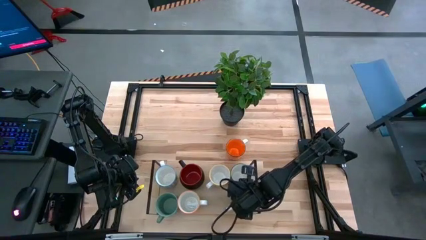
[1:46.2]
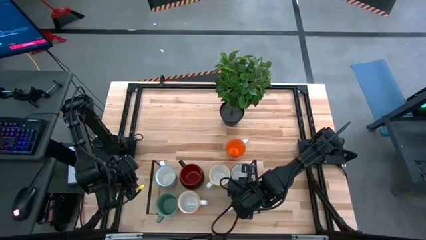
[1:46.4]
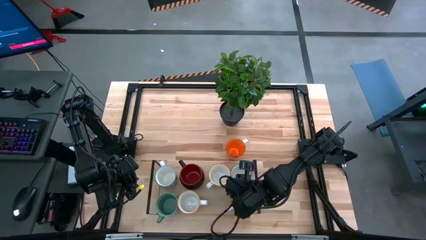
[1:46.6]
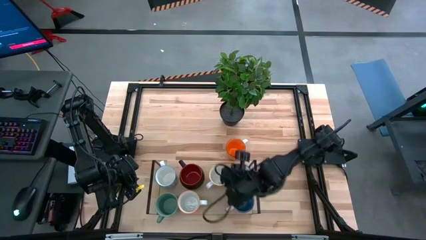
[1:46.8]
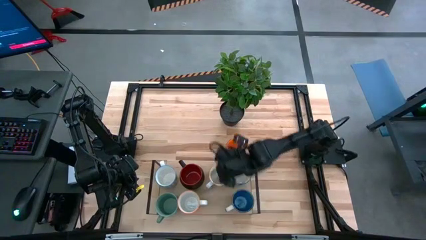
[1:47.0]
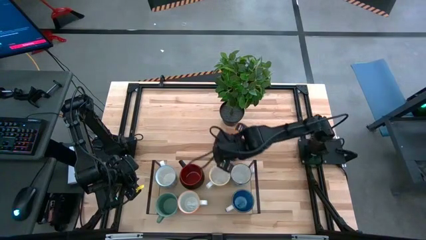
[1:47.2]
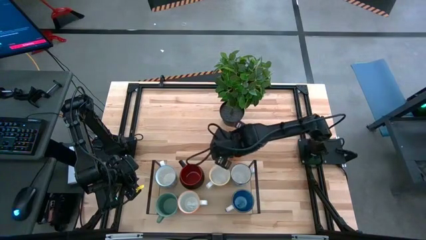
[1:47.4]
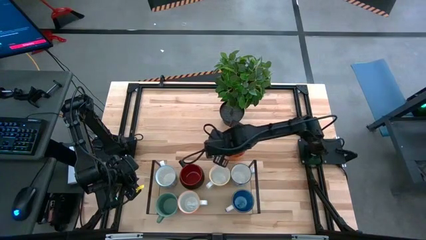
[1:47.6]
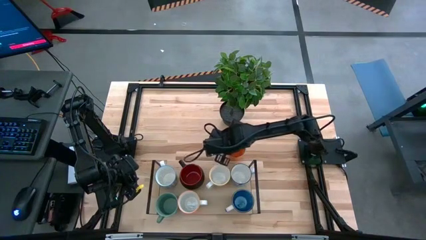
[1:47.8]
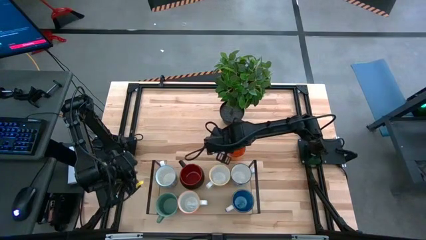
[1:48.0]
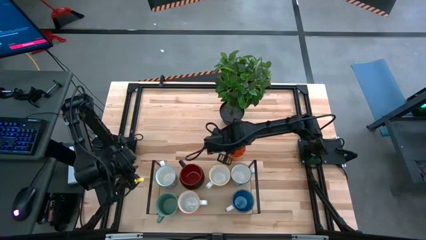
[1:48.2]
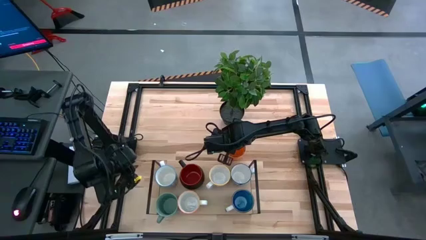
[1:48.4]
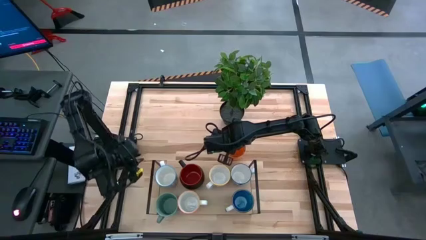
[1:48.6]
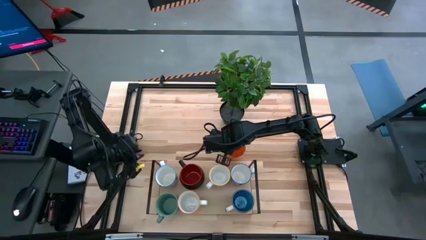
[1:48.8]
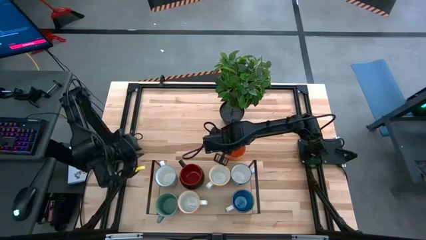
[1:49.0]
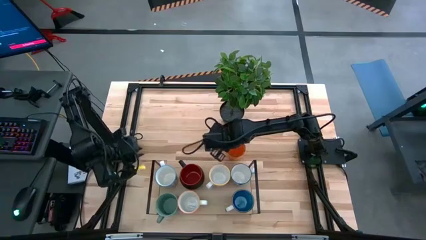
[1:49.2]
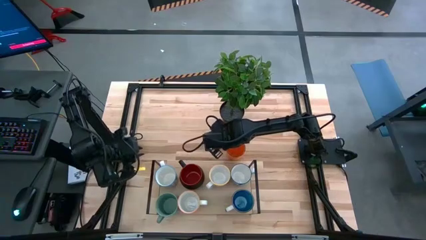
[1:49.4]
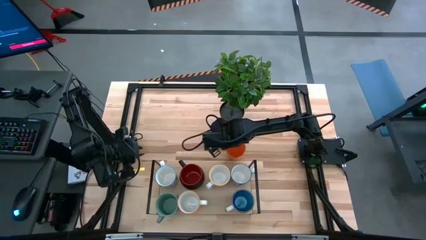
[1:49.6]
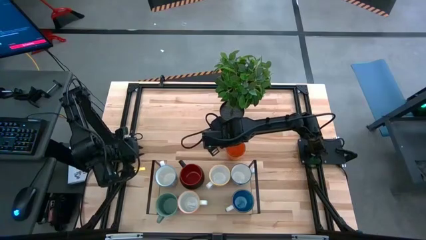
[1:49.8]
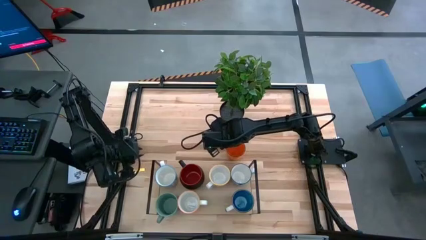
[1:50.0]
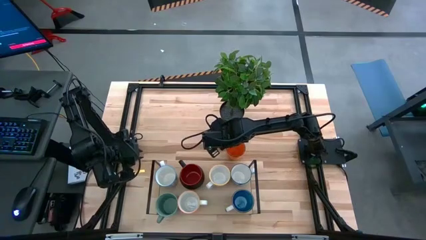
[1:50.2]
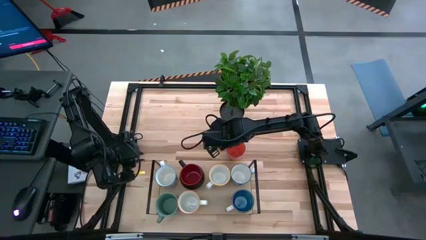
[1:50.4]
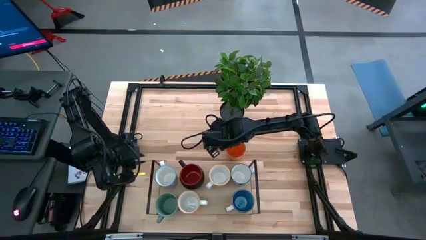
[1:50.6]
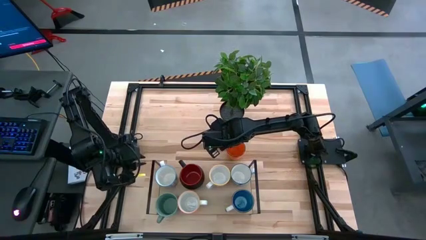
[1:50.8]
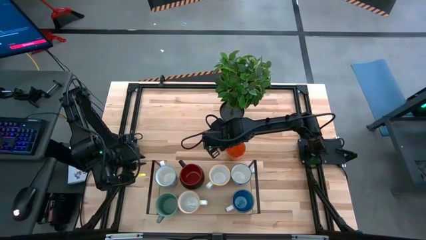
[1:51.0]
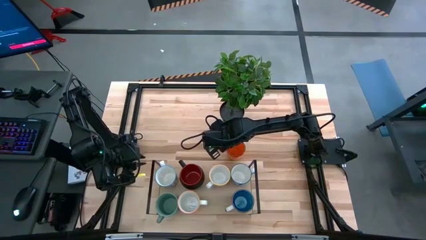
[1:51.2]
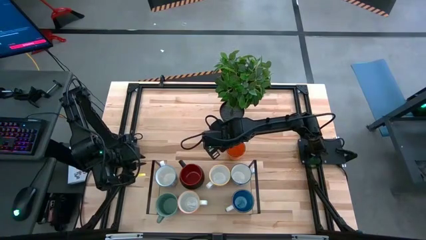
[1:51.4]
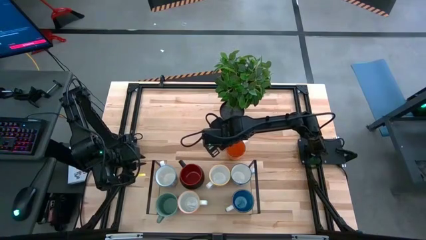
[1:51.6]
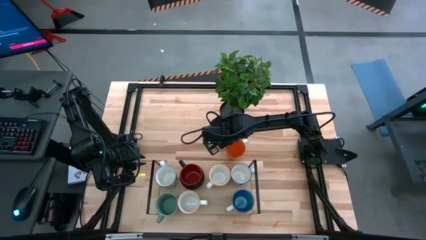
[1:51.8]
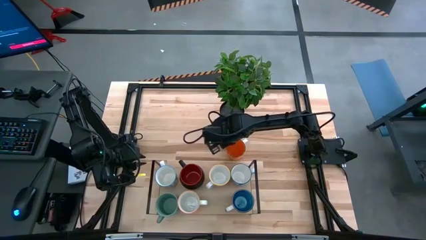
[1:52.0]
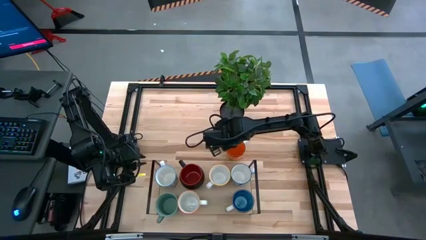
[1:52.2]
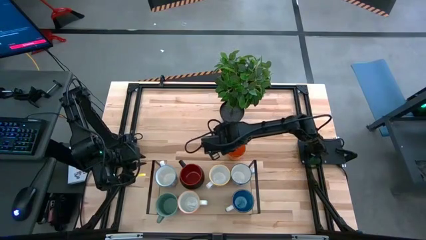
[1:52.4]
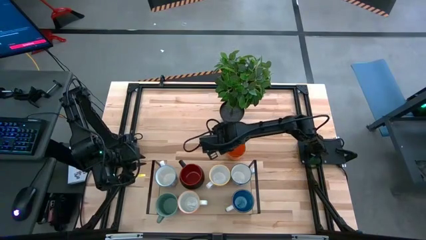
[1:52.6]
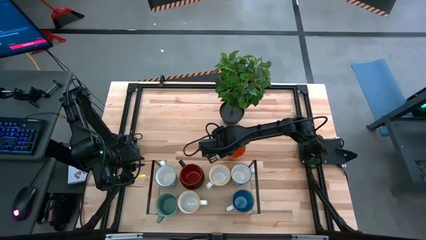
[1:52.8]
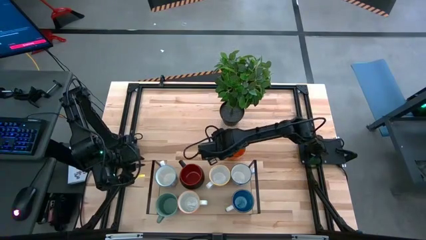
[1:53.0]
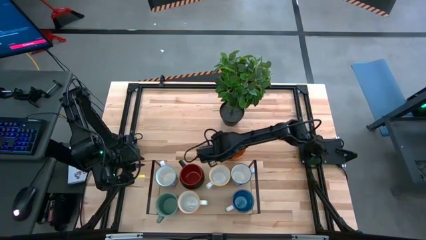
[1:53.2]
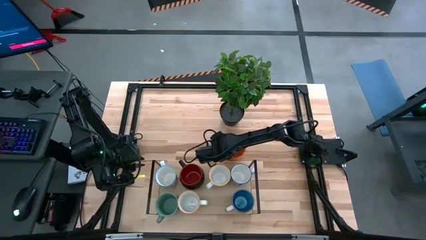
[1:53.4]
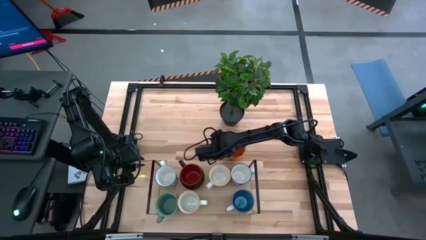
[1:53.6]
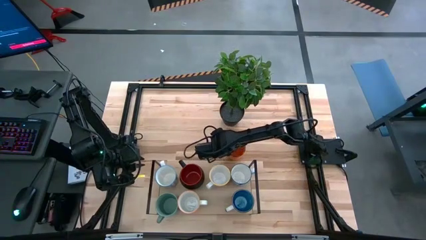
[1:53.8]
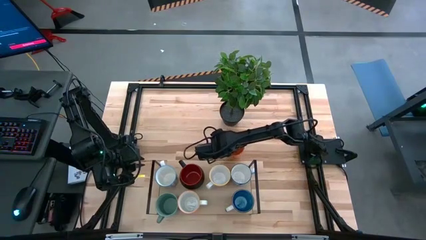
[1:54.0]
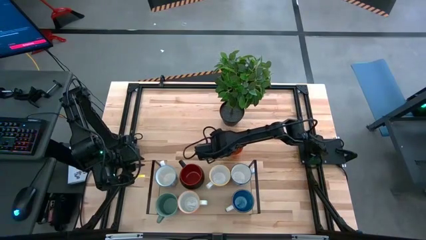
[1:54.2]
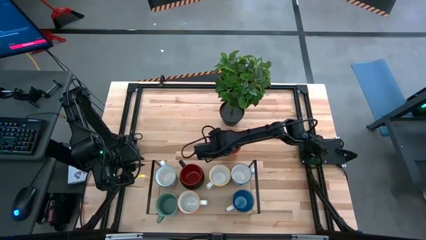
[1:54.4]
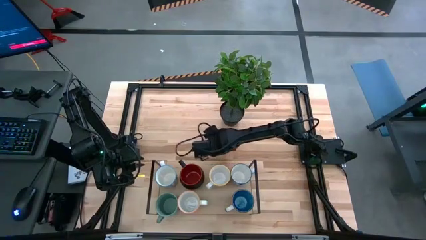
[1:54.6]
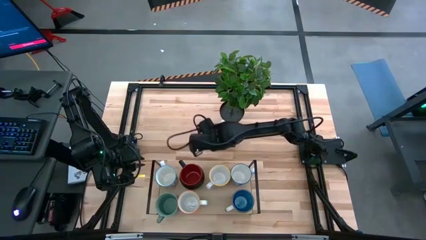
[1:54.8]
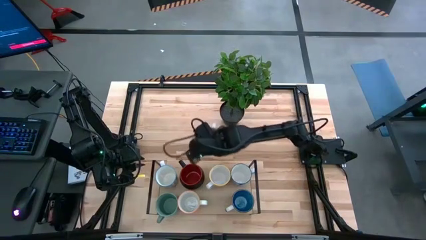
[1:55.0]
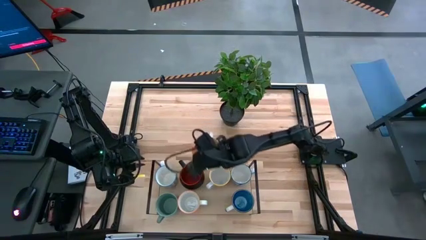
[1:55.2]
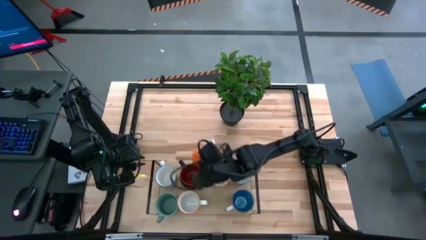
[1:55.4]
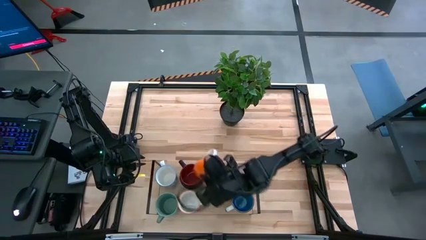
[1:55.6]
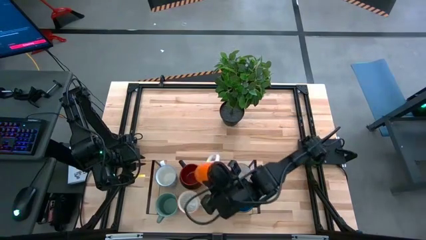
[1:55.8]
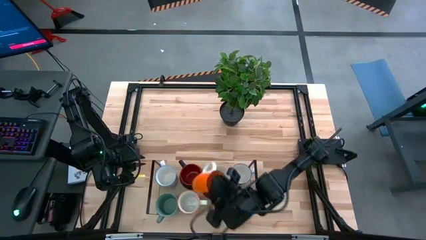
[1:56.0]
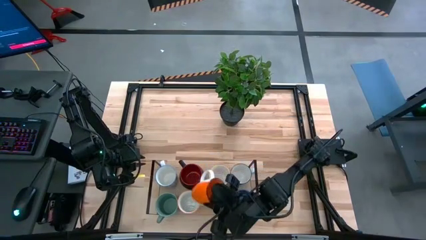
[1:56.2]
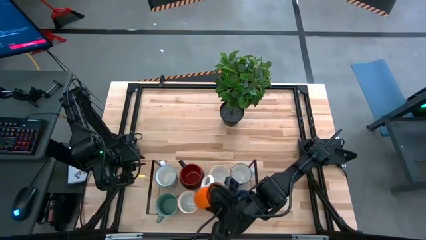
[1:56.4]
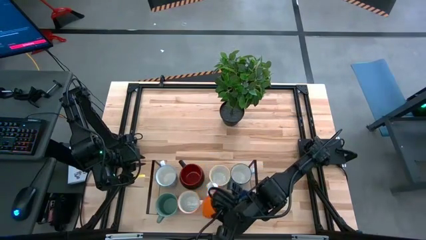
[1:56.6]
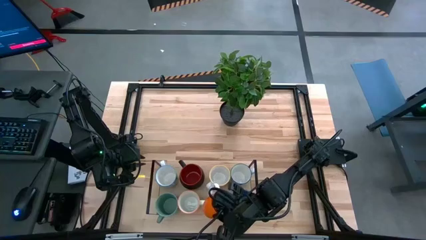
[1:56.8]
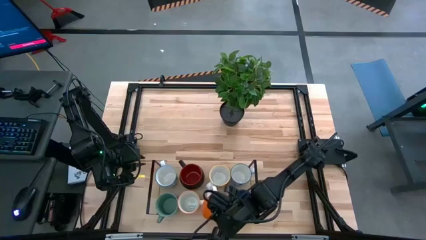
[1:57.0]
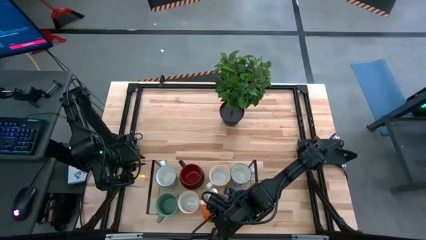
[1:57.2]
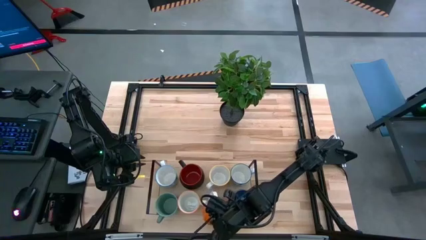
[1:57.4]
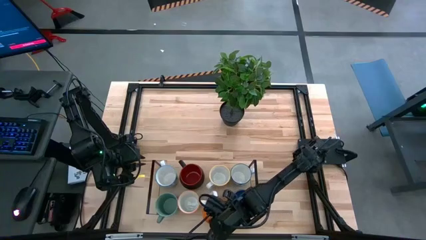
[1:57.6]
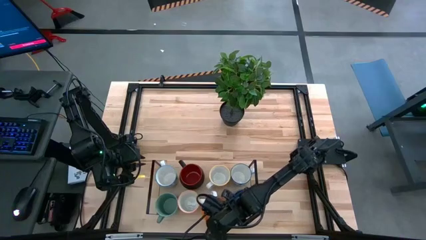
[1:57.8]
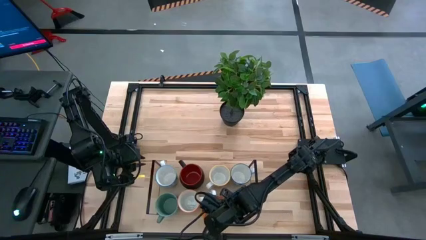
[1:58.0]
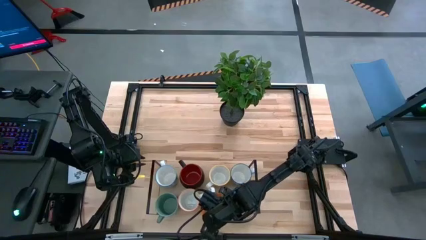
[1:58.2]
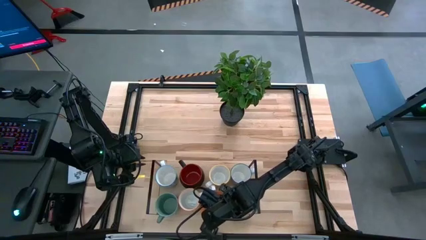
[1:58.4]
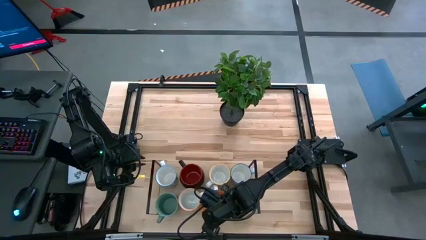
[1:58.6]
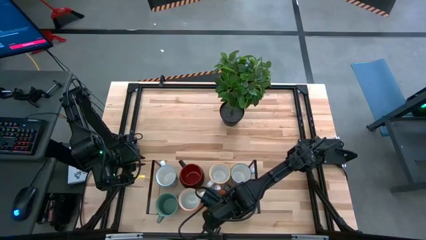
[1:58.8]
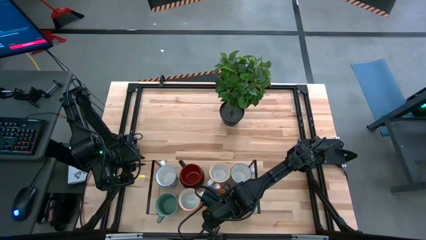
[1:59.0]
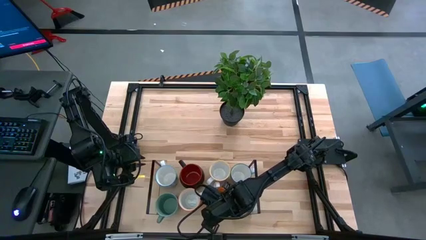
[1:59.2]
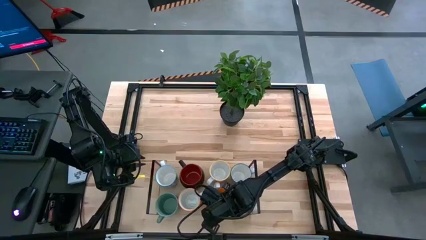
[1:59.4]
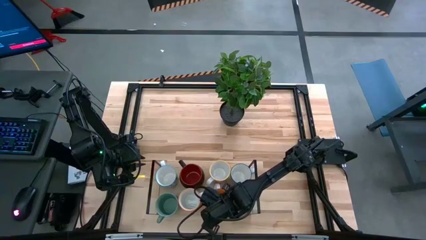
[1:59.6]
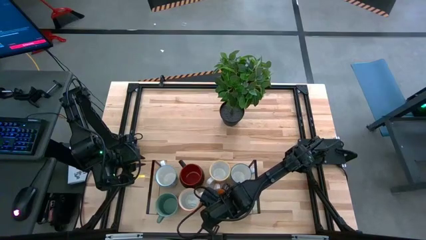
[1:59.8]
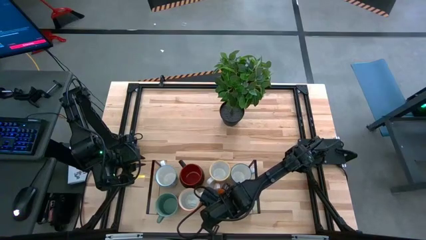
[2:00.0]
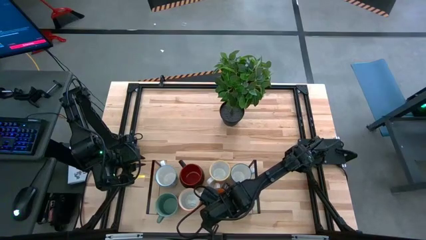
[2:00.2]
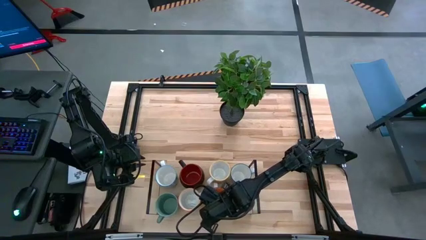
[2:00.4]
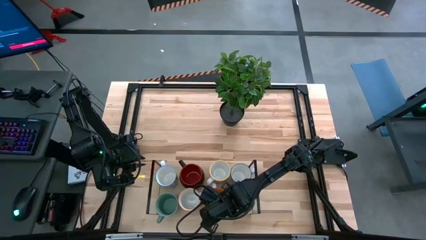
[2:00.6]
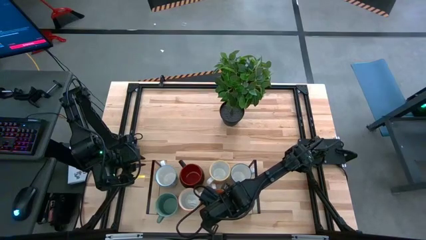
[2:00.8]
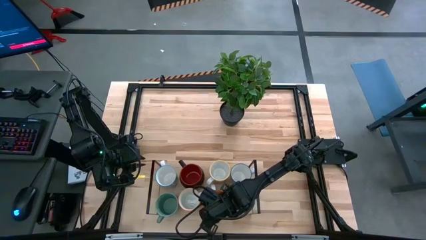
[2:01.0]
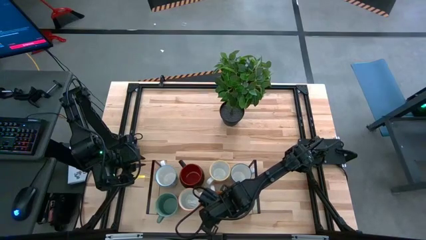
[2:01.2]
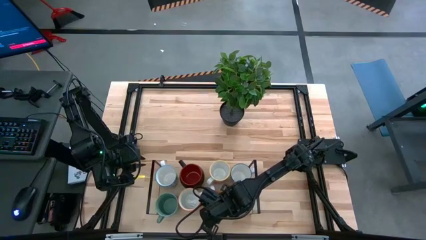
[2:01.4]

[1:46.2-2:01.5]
Task: Place coffee mugs
Put the orange mug on the shelf

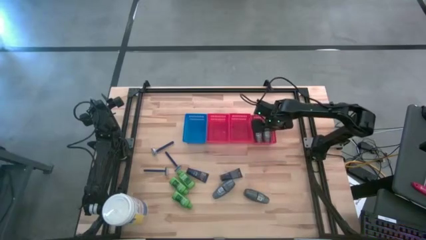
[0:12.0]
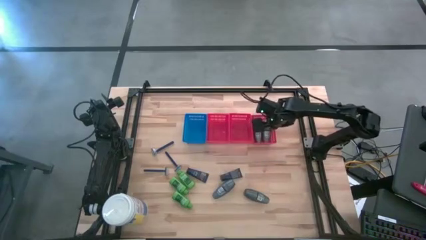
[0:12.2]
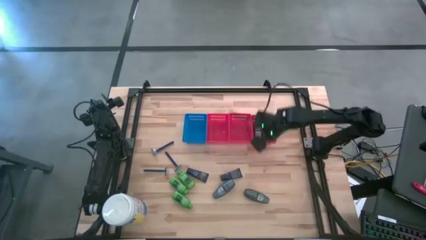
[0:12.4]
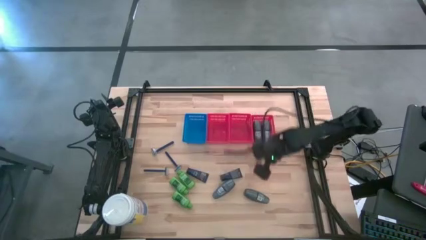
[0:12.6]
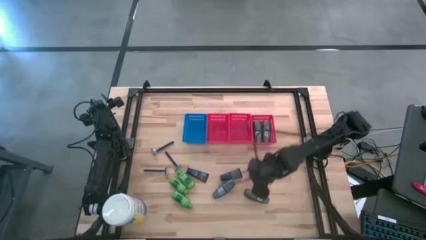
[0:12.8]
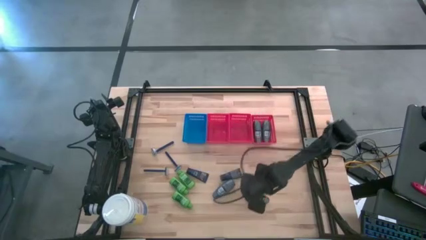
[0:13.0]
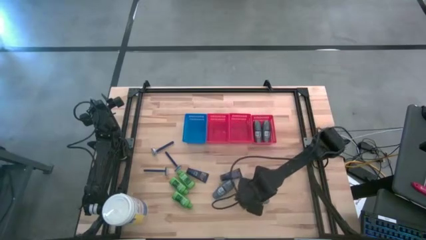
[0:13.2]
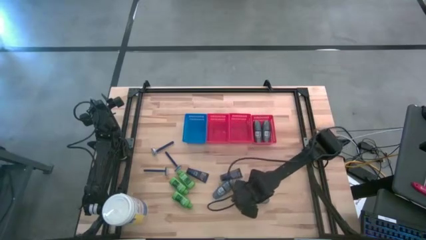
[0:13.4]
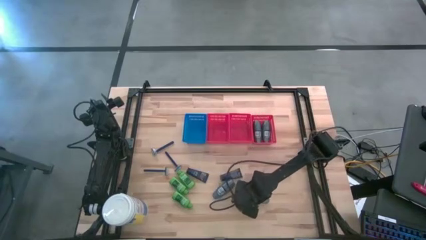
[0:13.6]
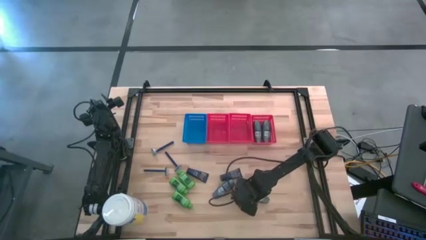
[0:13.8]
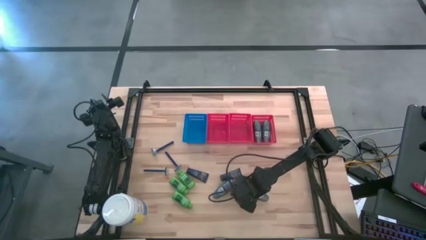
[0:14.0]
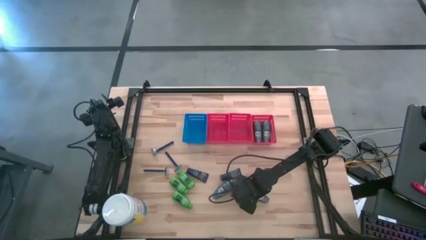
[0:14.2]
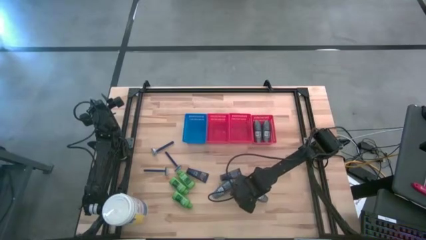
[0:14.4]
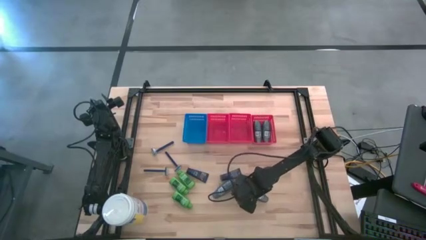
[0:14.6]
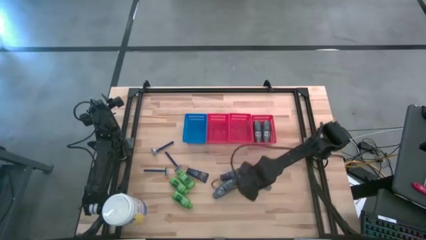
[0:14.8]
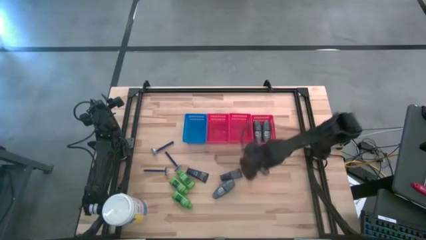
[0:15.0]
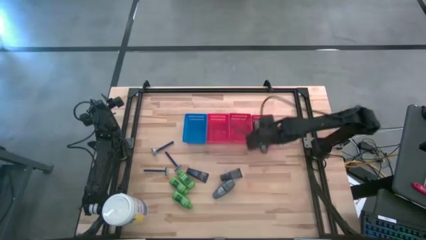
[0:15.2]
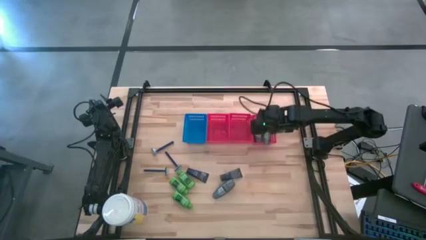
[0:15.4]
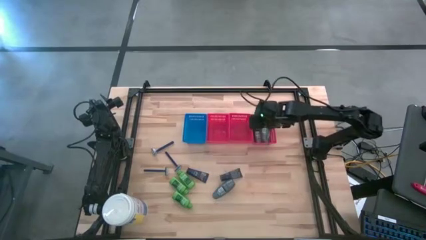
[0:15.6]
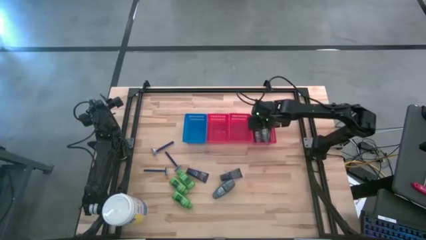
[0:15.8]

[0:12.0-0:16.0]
Task: Pick & Place Travel size toiletries
Put the gray deodorant into the right red bin
